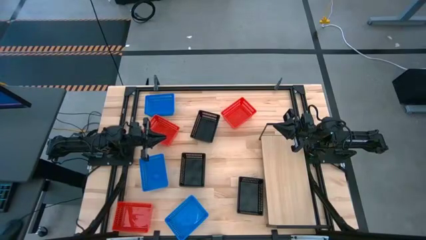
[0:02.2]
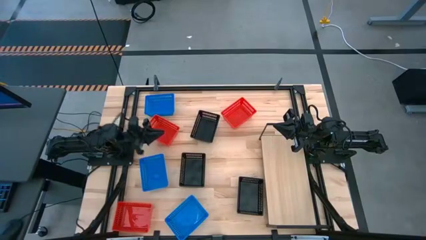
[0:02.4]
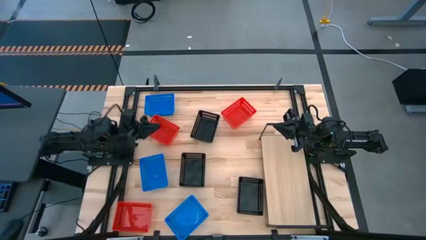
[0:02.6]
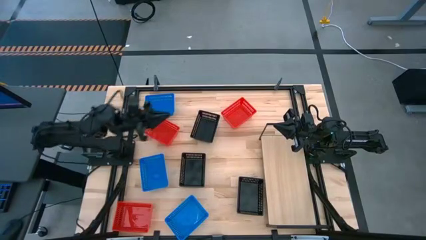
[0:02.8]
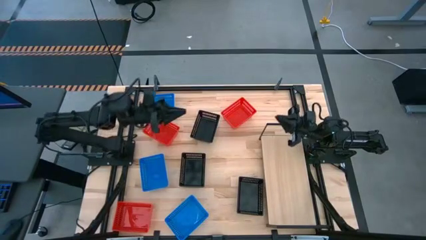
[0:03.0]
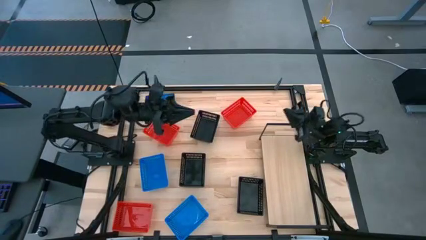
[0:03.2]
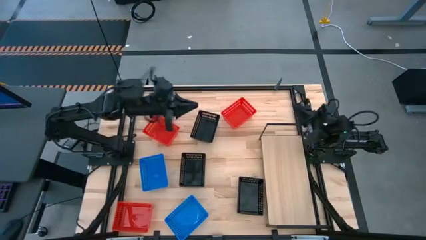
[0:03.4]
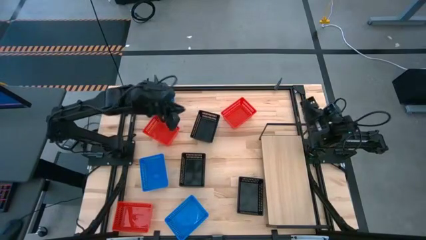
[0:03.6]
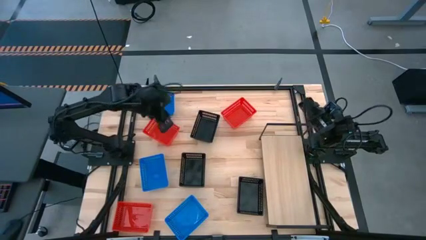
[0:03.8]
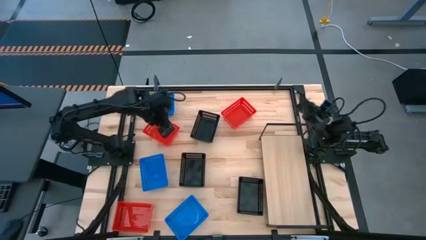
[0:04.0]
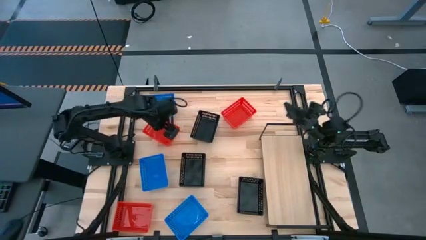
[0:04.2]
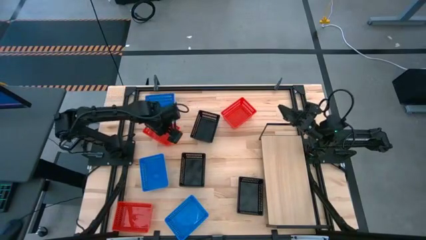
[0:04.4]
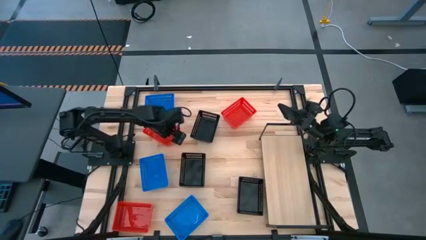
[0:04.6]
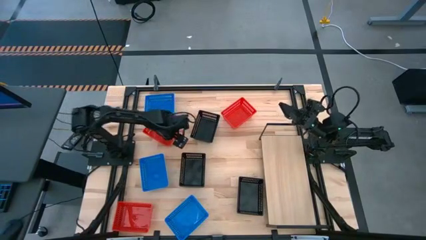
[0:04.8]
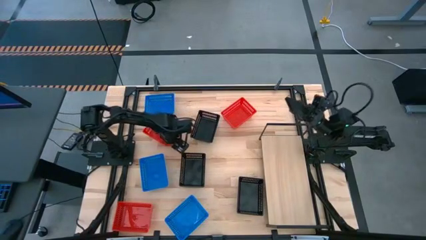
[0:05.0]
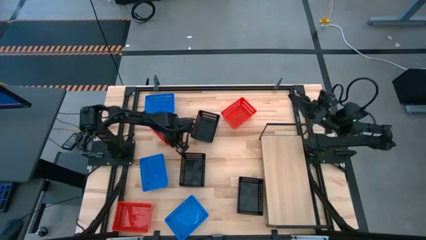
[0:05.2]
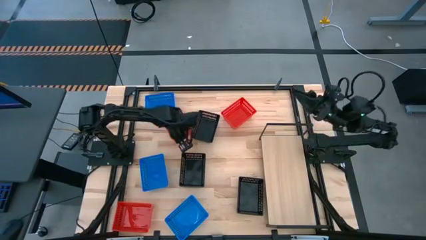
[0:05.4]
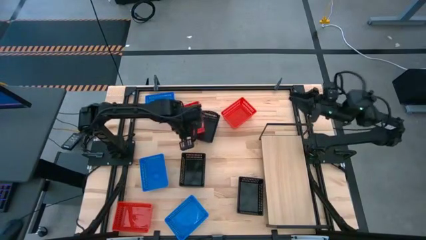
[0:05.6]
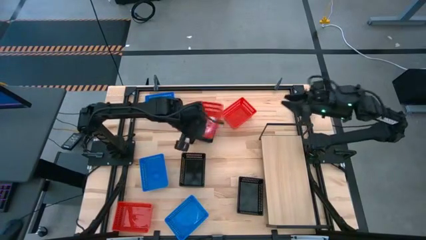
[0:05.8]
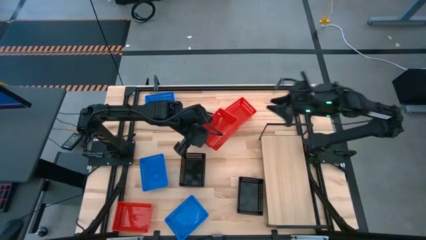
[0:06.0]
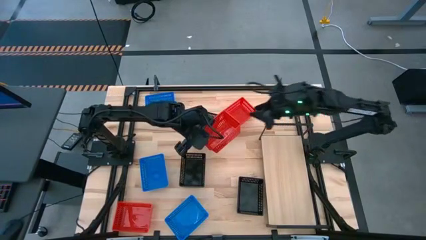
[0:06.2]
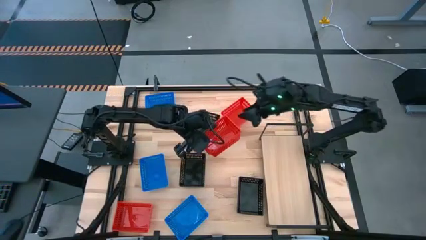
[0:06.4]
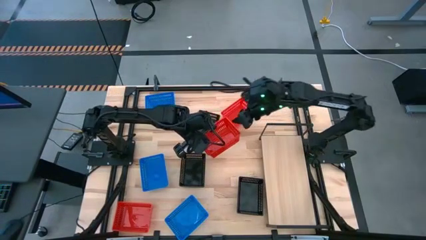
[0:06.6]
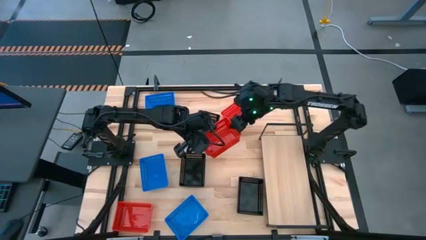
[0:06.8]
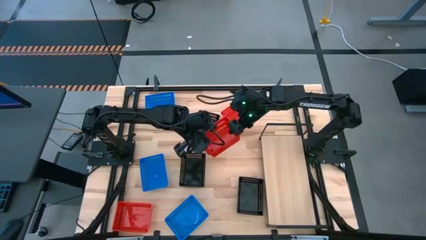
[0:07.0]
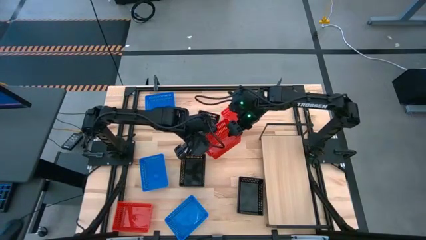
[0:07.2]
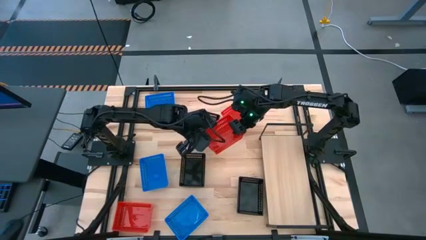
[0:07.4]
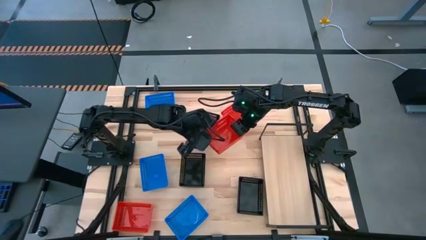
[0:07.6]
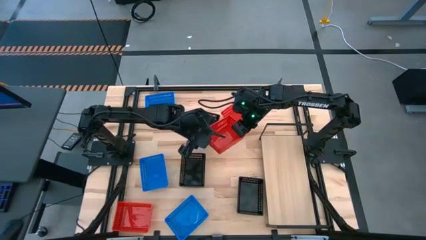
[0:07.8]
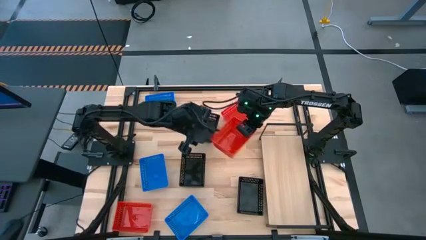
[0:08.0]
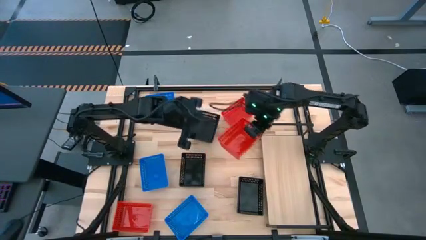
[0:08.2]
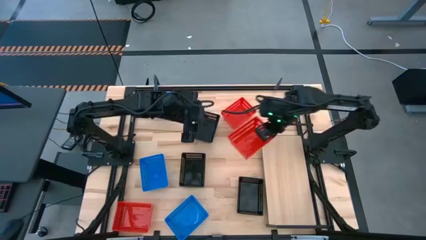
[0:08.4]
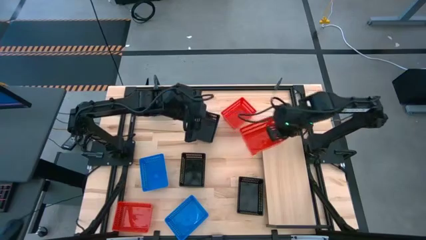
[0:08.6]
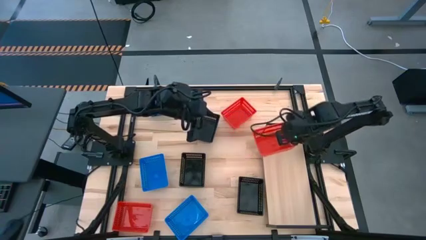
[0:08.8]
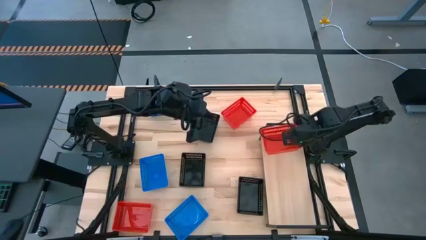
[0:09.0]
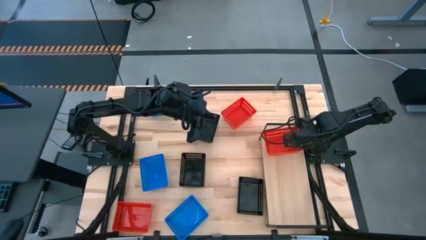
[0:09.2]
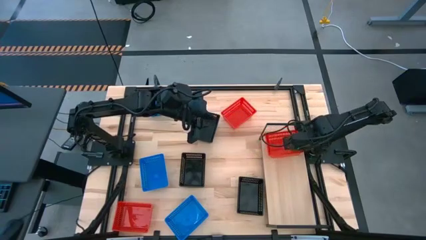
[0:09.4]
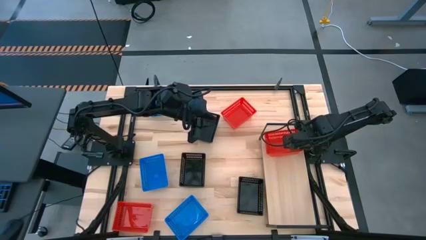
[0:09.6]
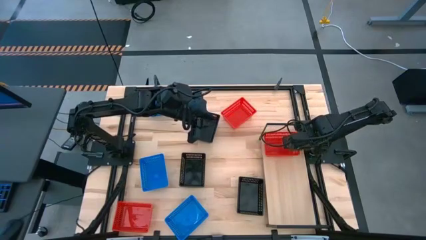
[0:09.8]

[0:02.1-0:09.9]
Task: Stack baskets on shelf by color
Put the top left red bin on the shelf

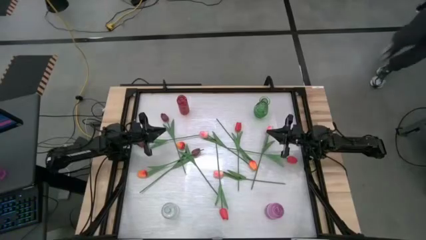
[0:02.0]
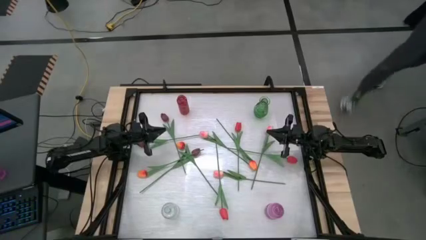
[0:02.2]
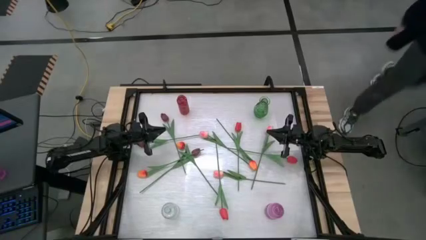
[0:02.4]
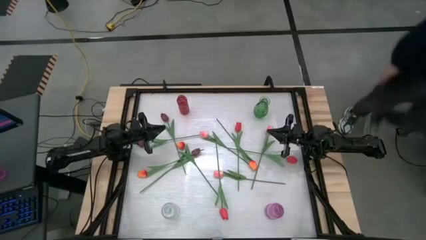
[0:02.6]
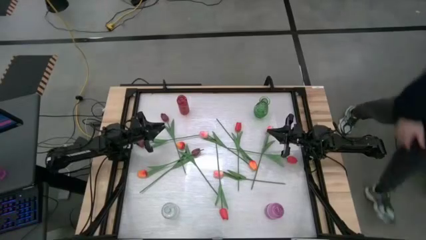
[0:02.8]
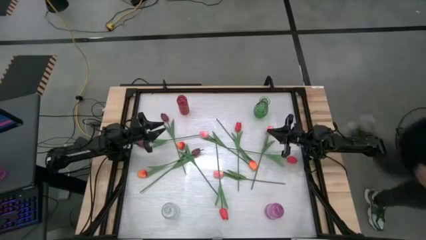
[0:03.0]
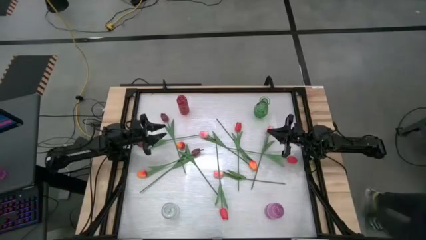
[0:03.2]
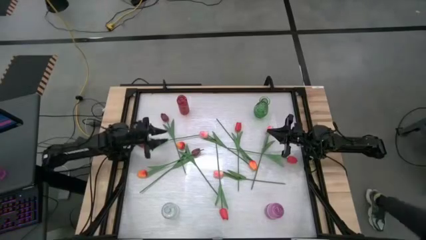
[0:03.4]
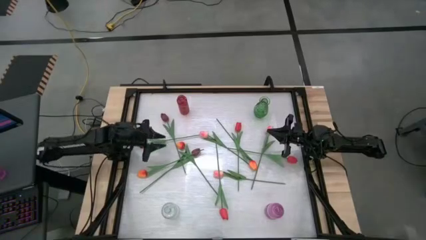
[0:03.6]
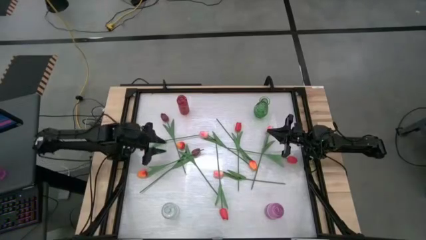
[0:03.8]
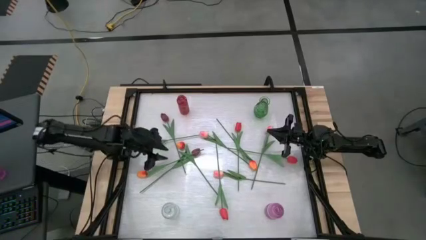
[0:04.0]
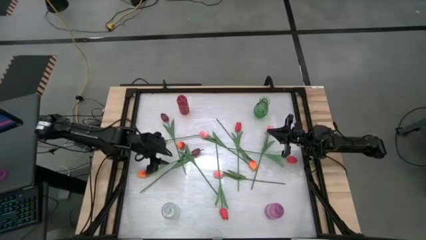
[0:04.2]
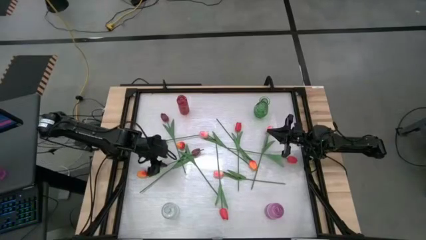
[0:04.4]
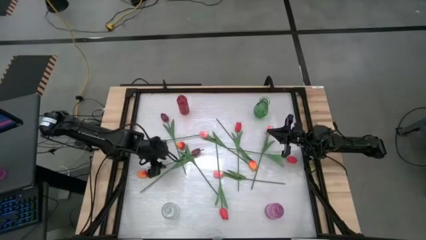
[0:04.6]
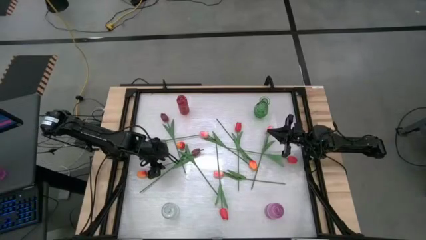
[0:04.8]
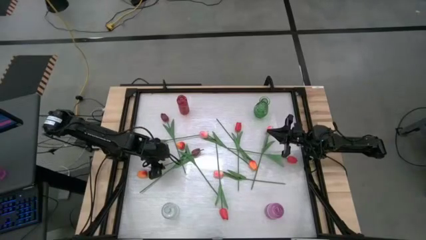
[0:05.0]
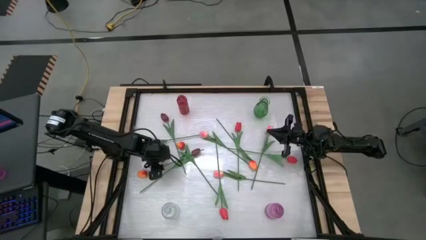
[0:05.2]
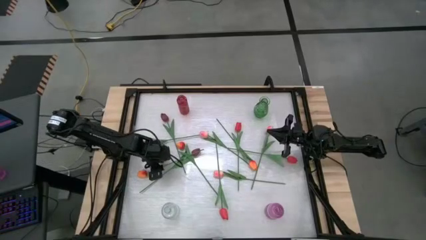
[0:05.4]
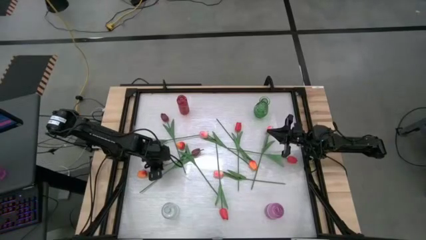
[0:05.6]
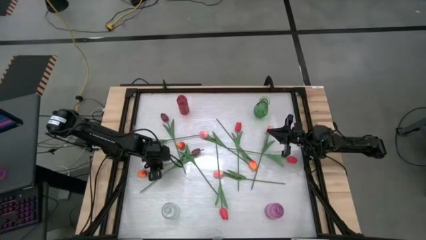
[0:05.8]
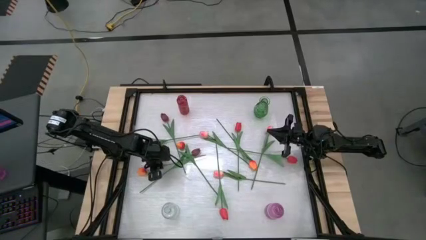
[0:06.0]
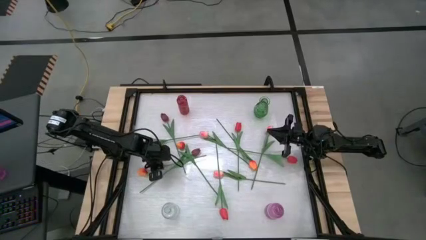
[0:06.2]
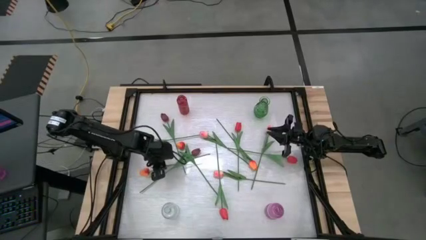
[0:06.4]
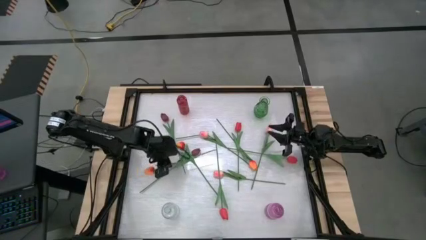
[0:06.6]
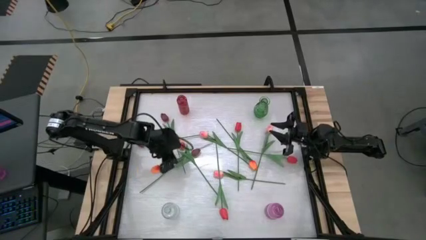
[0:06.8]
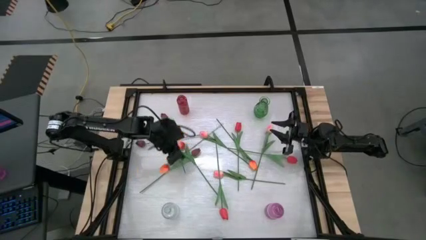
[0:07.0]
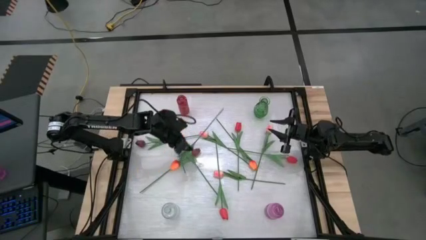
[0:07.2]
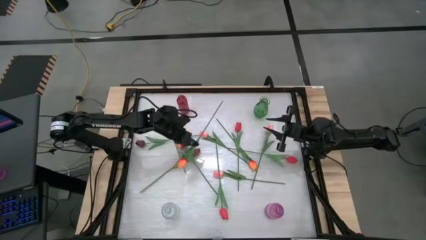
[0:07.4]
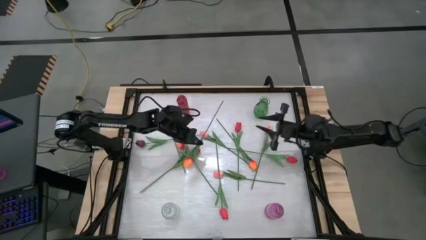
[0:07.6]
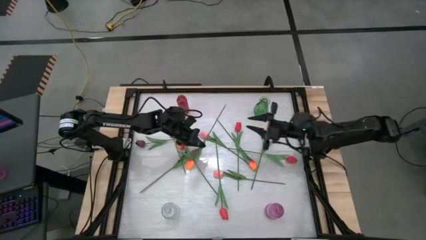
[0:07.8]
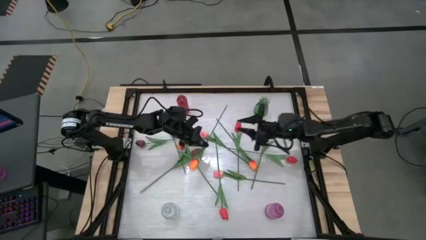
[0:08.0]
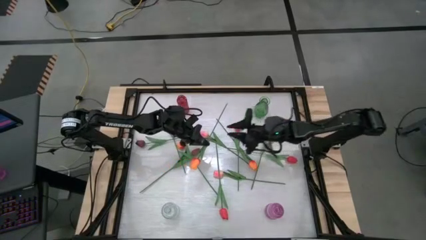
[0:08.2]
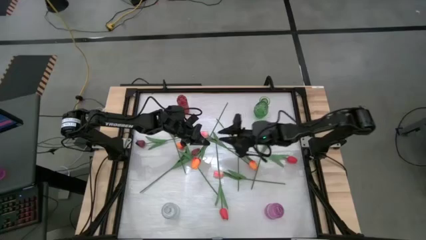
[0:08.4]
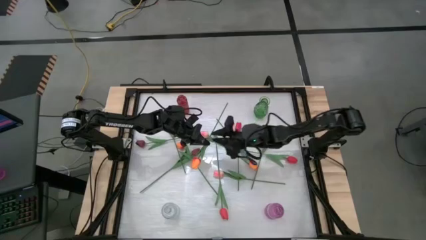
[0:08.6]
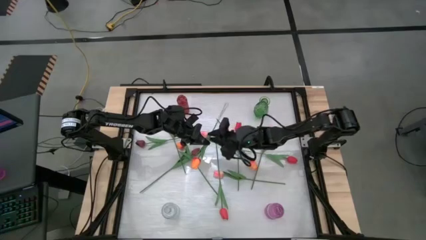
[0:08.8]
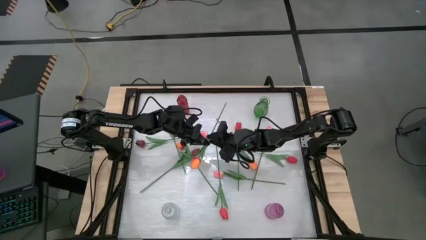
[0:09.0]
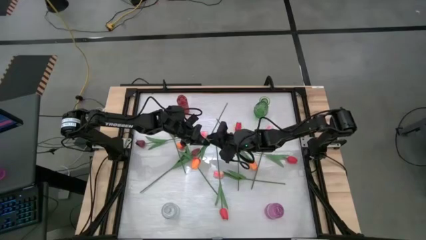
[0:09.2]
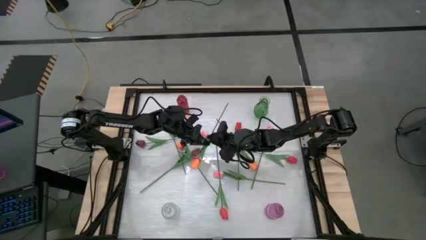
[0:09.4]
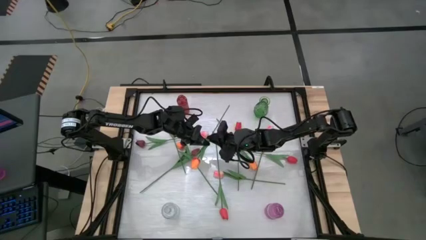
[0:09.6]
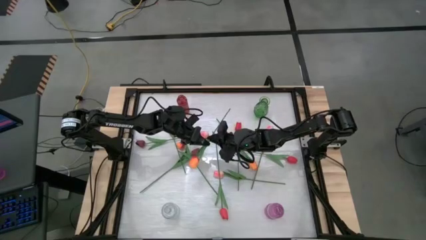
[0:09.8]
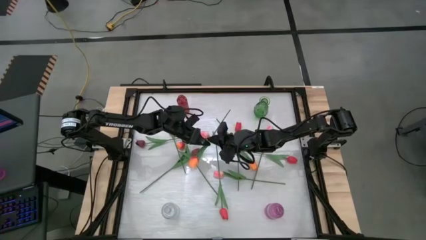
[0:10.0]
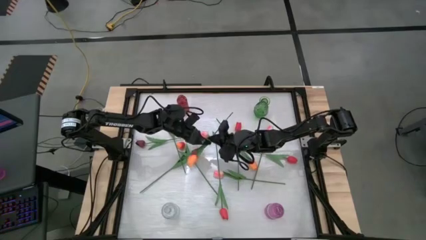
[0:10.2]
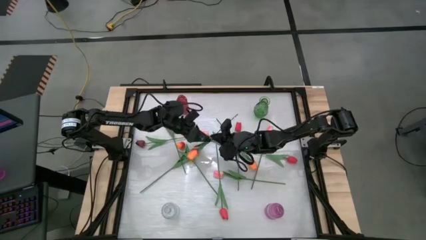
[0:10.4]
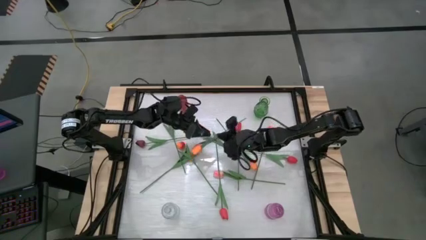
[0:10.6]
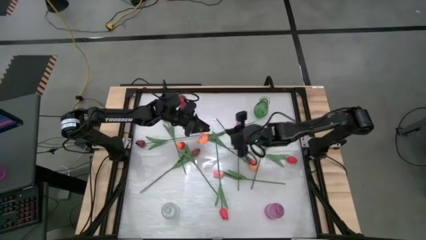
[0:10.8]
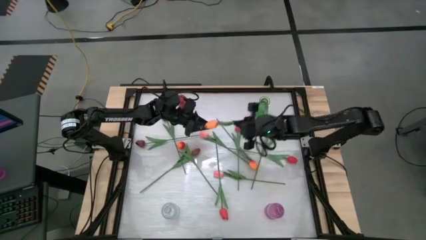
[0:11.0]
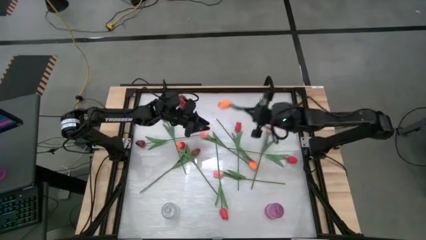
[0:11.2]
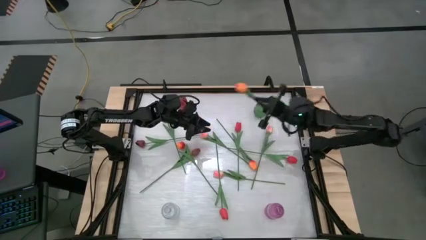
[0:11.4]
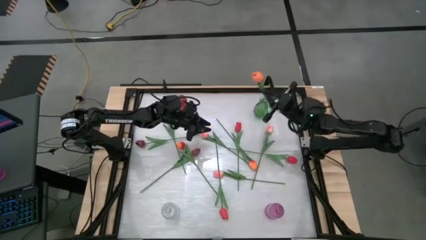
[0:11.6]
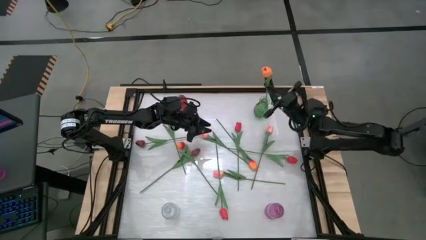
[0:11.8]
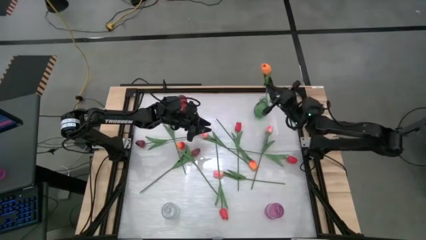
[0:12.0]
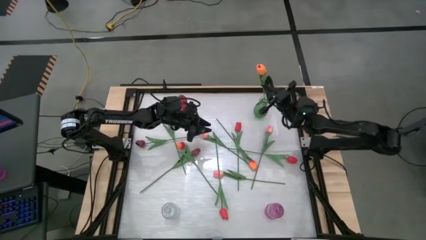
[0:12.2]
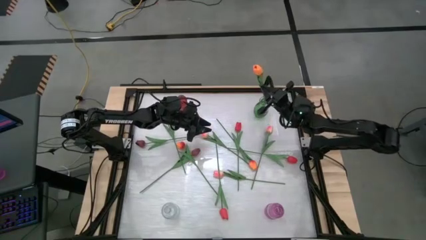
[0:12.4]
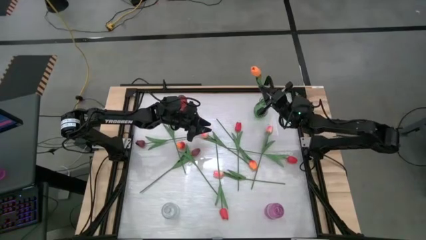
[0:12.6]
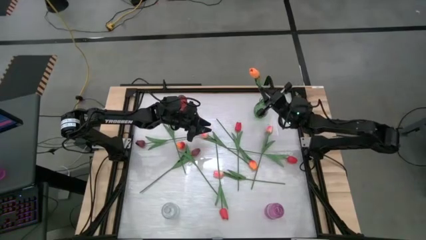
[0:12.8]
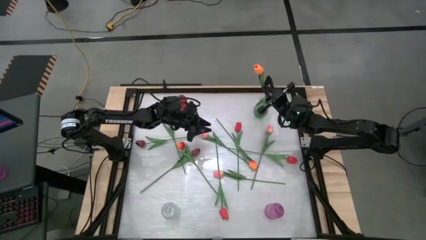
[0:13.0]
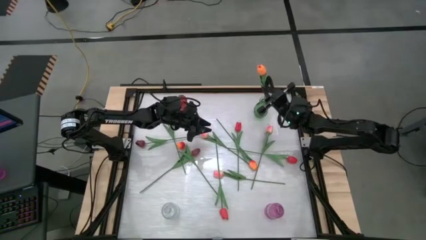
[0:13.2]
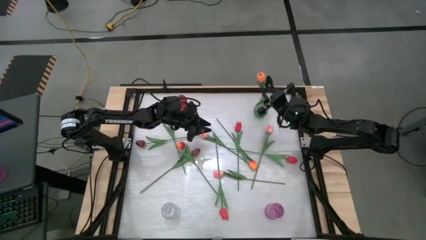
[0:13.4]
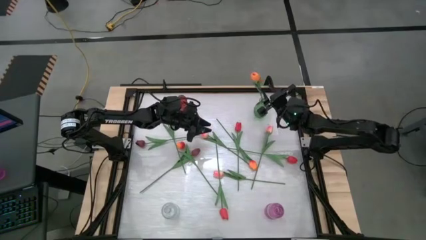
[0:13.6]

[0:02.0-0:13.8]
Task: Sort flowers into vase by color
Put the orange flower into the green vase
